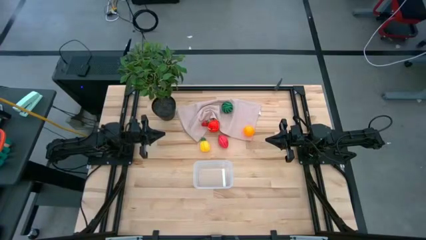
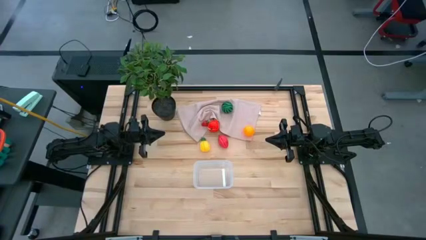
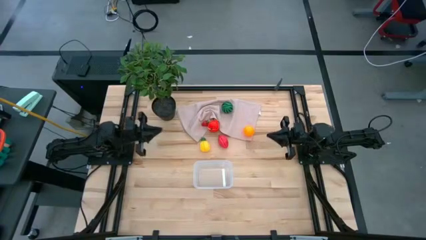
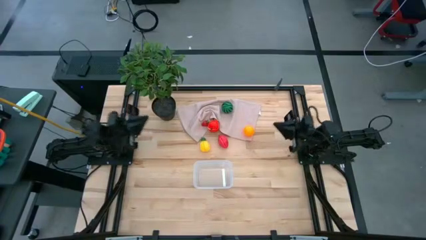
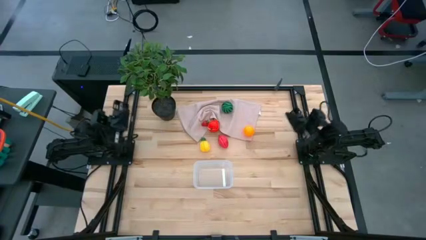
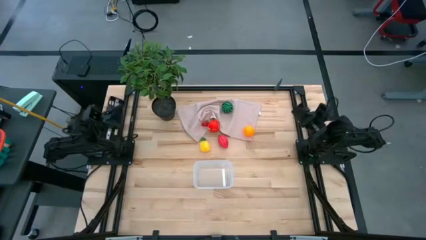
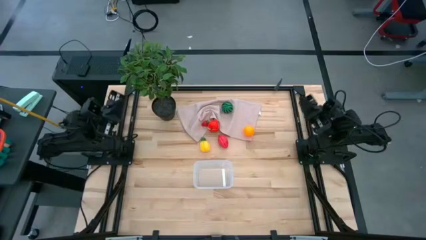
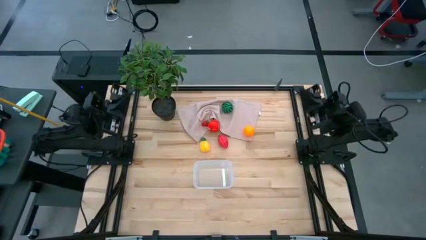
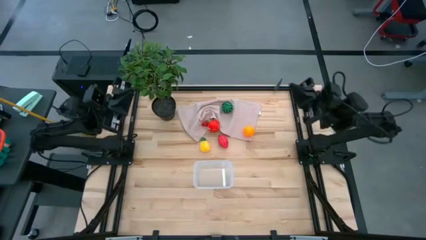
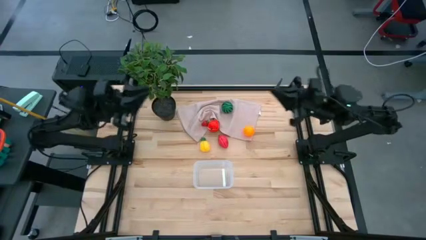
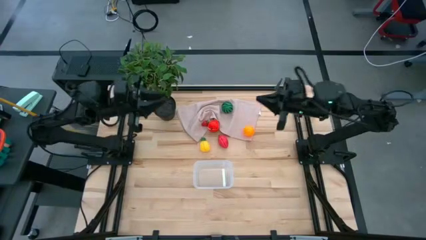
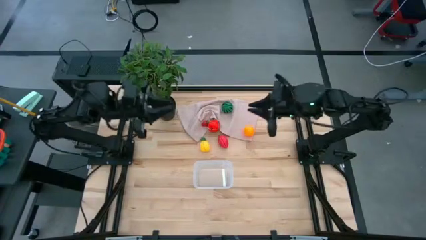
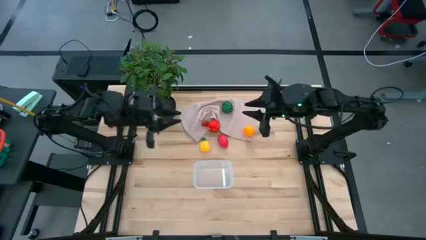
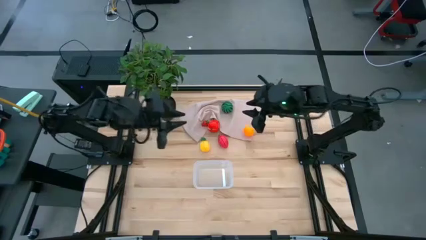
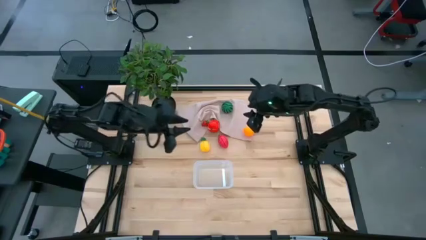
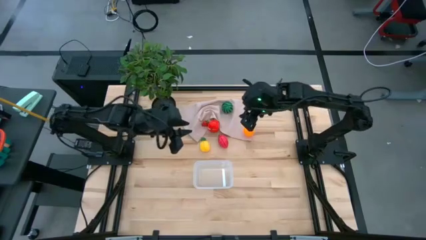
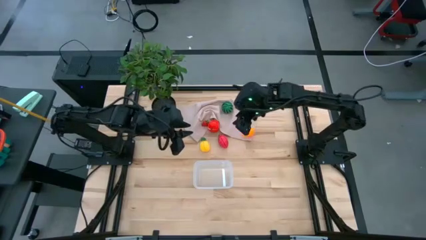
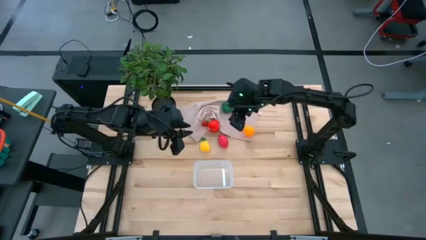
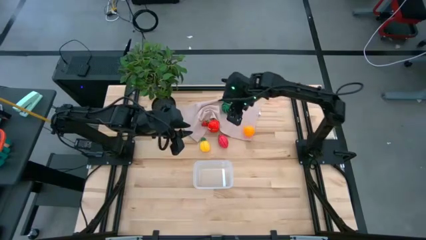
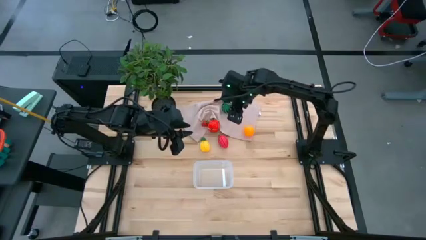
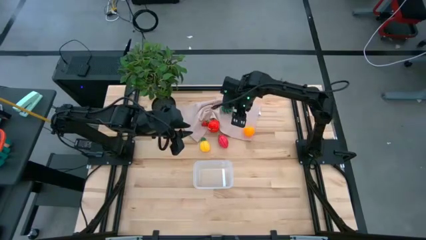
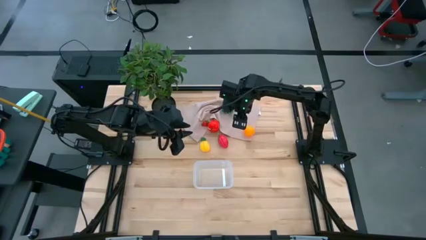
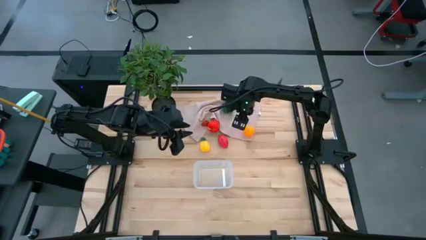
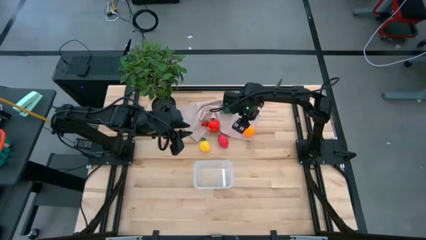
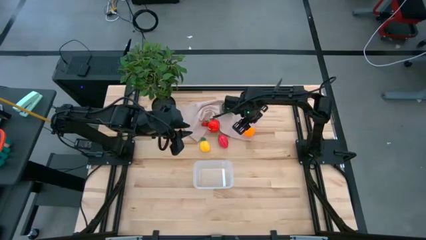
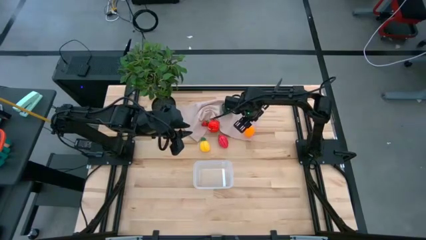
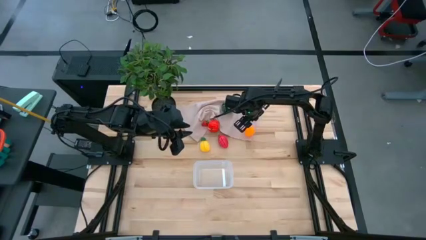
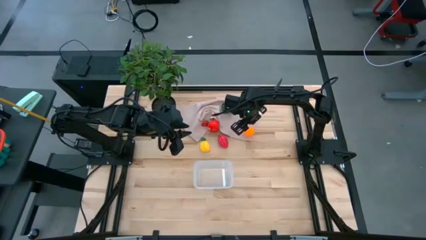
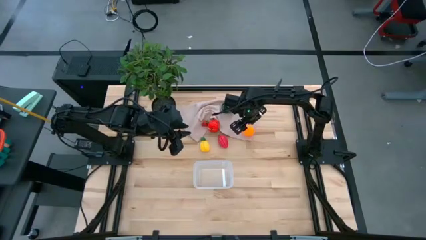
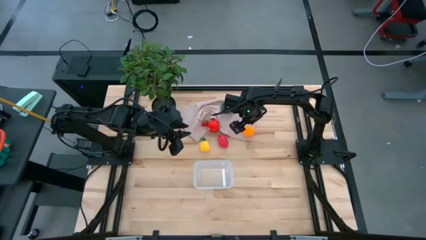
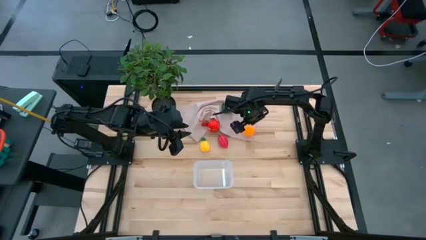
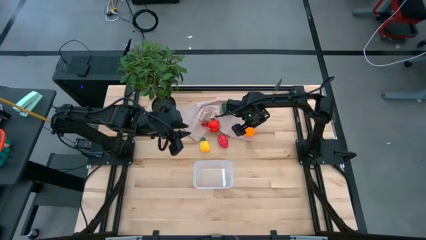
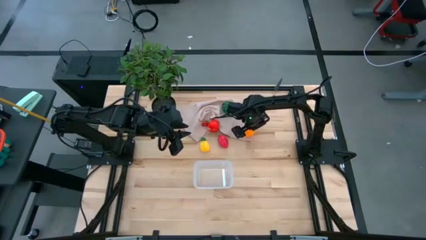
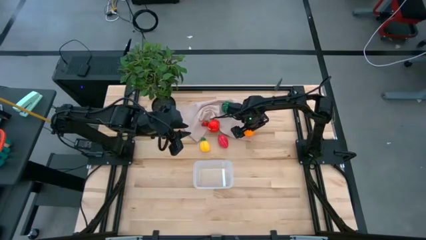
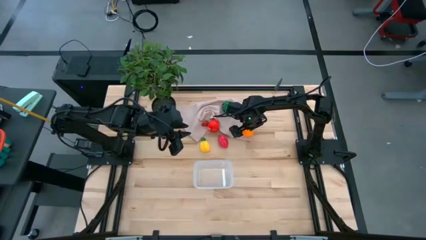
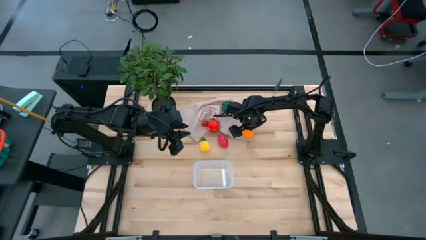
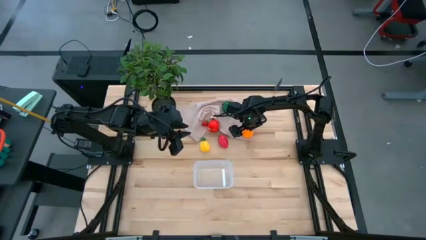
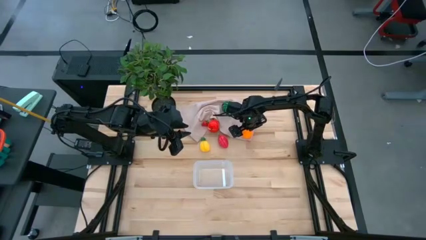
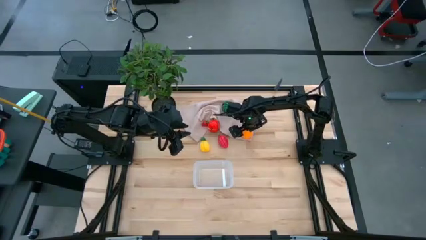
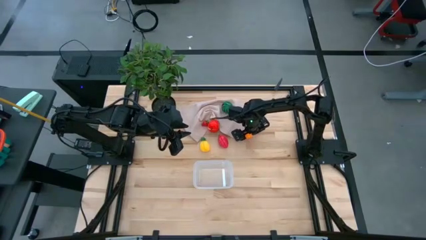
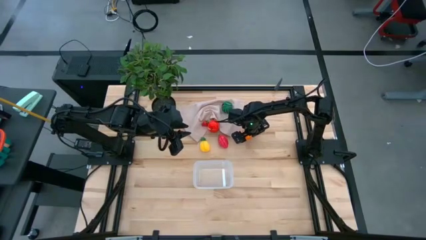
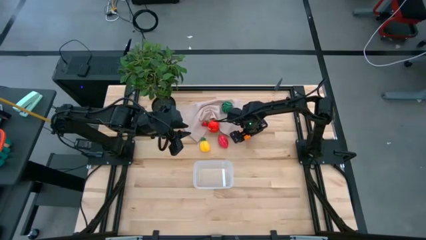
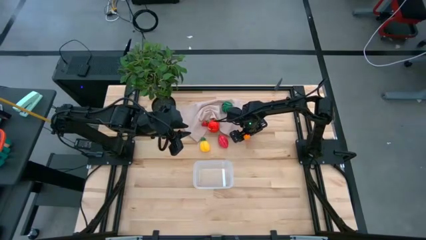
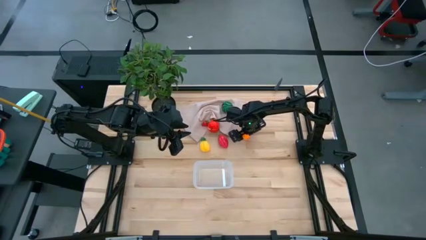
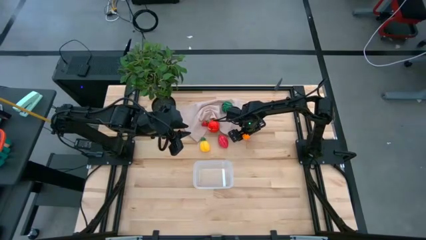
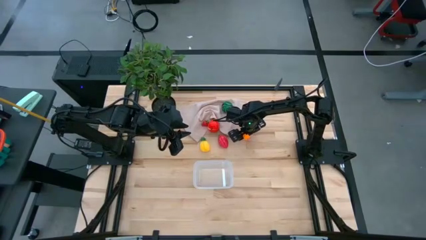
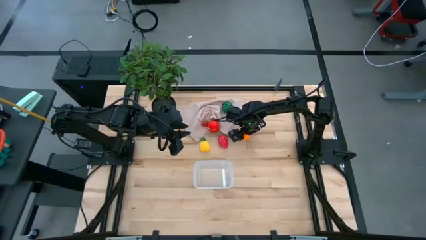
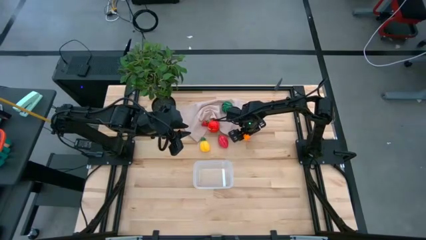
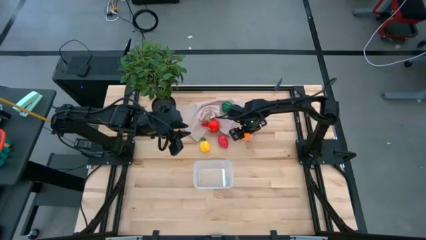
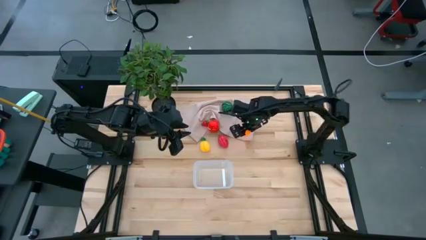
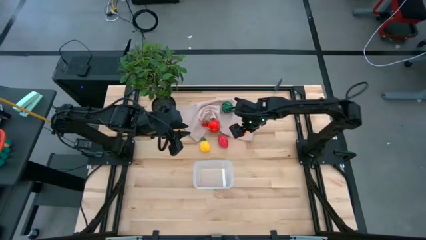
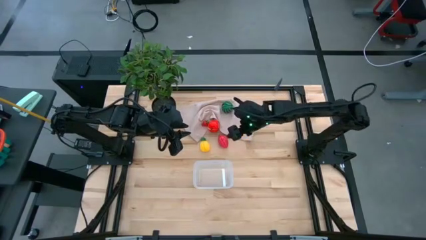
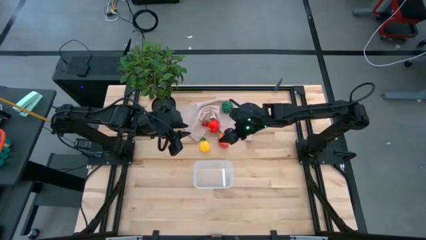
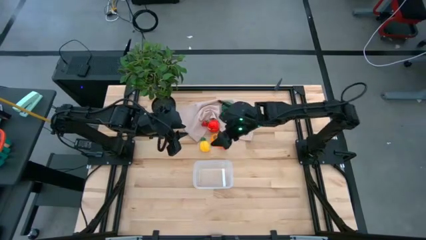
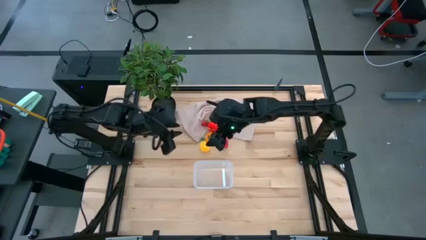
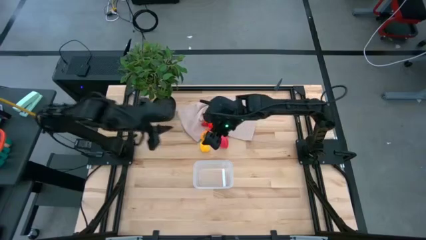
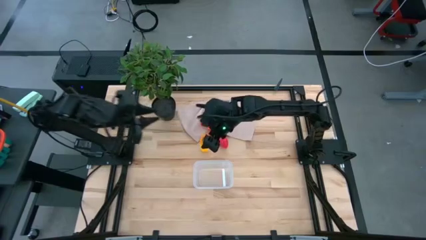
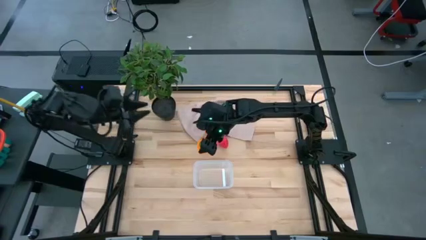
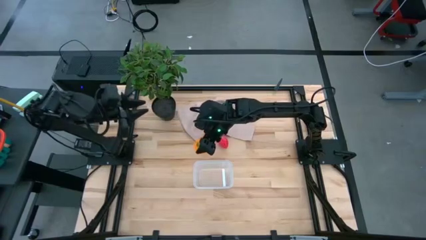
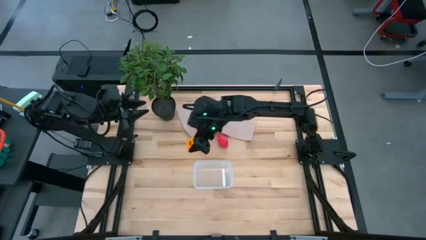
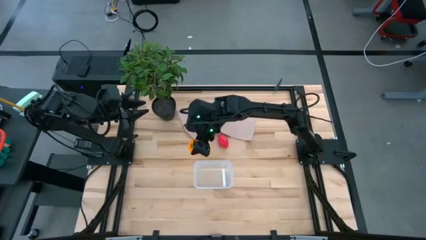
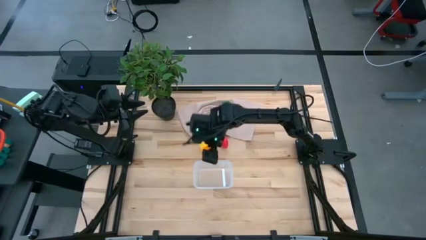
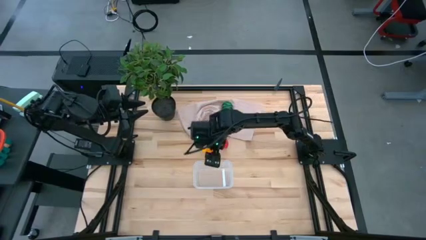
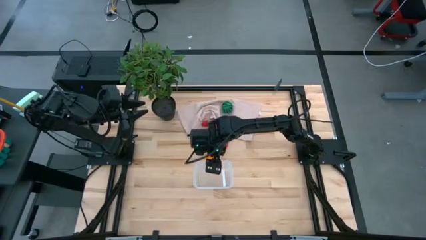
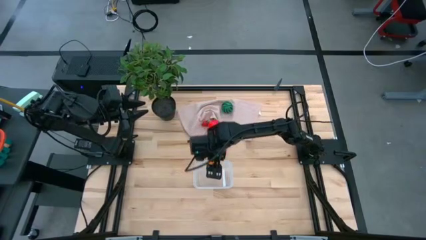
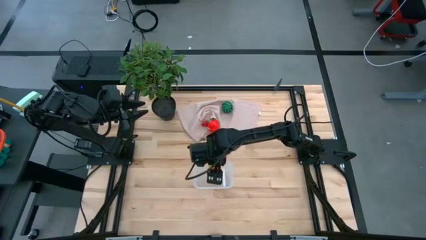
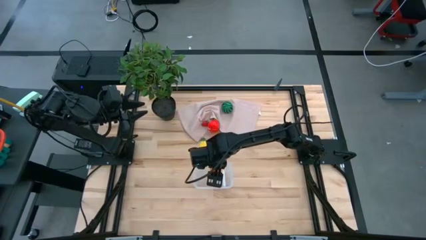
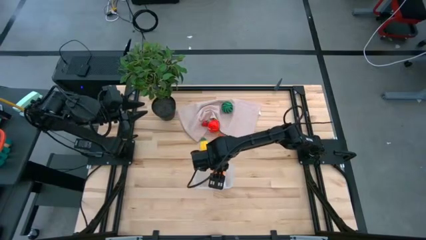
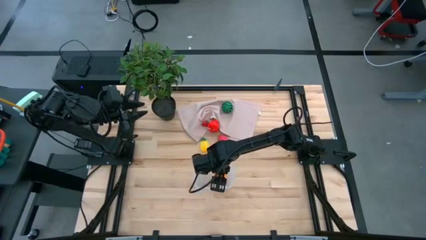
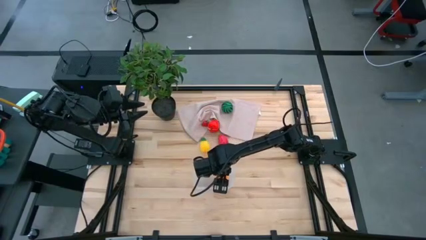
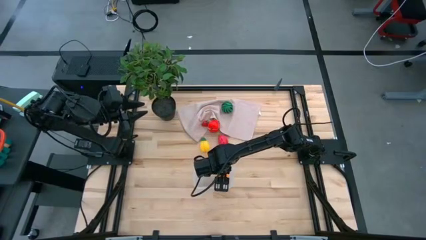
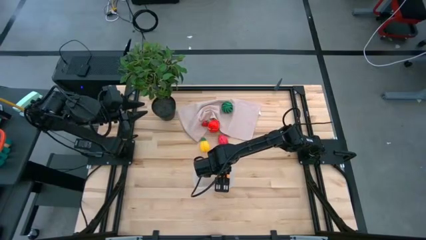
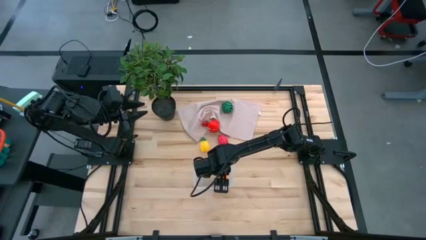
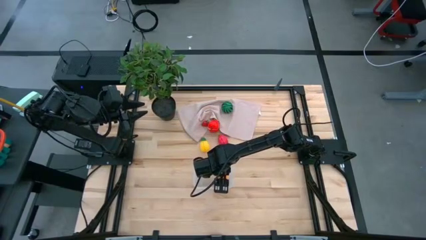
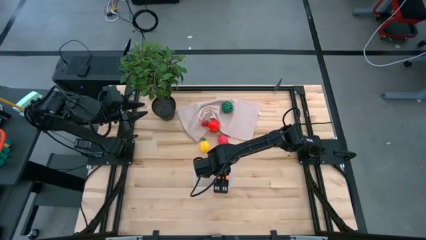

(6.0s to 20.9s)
Task: Pick and placing Produce into tupperware
Put the orange into the transparent bin
